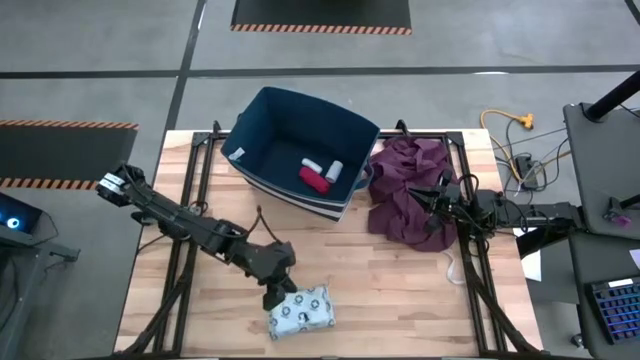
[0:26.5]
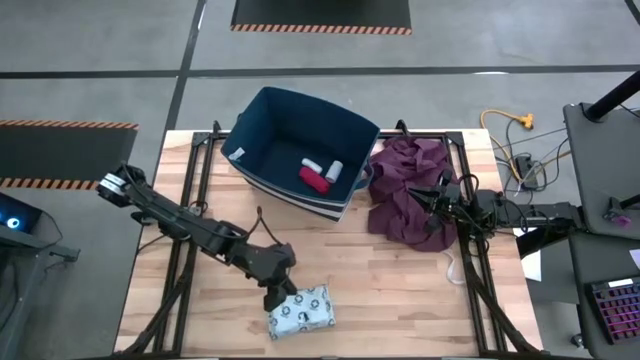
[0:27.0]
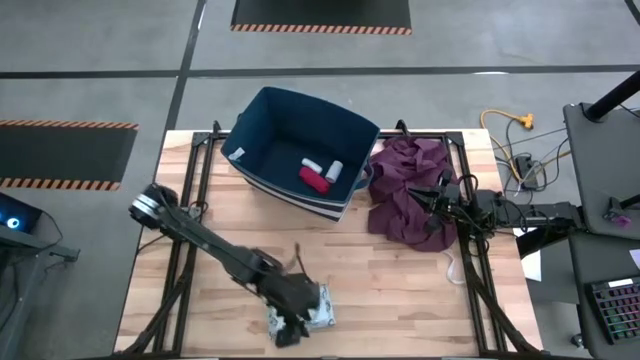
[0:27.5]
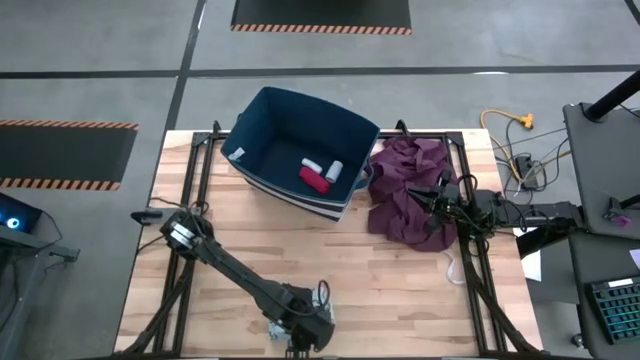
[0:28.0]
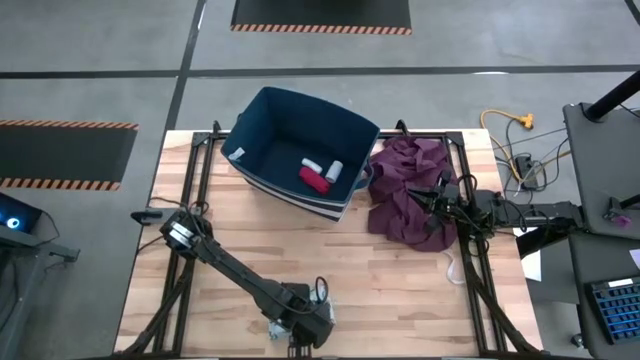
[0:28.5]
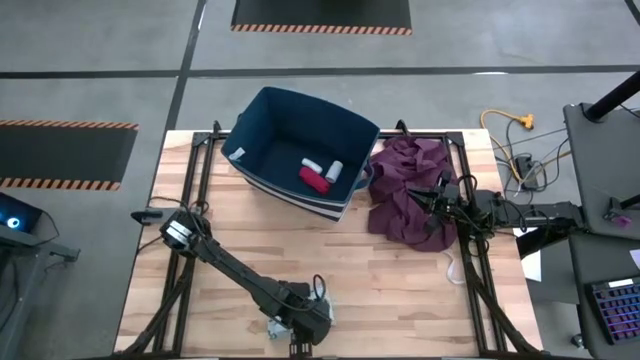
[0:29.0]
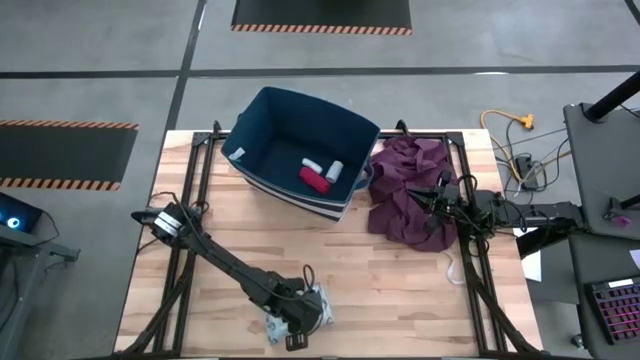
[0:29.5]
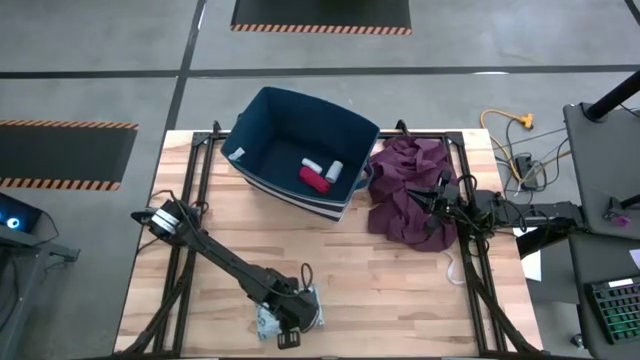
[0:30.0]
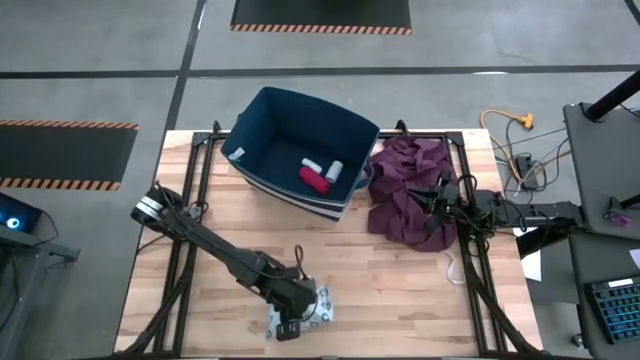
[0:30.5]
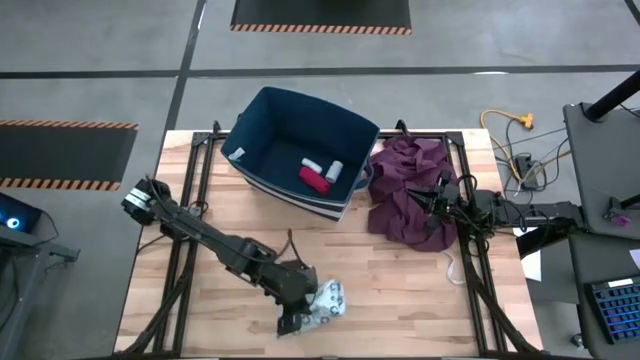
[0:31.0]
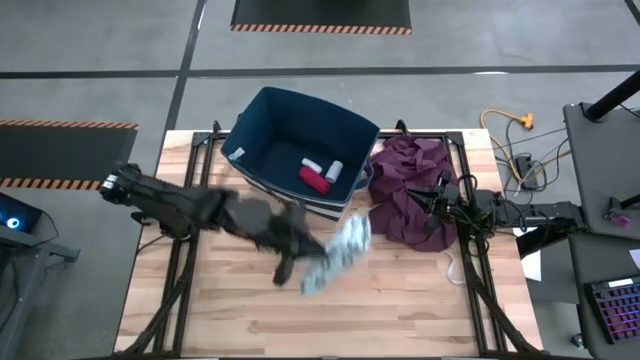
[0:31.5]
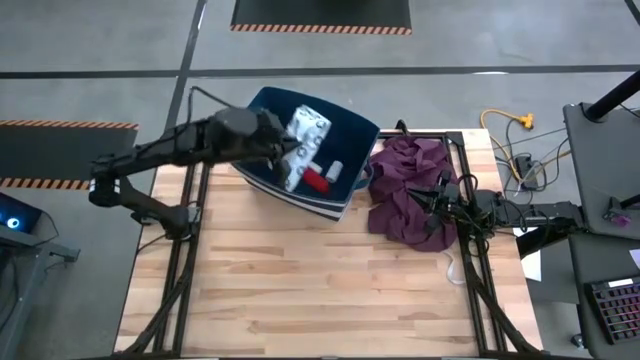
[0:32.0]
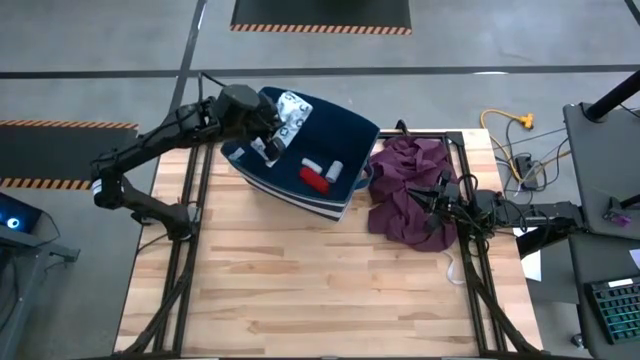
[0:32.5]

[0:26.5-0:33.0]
Task: Pick & place medical supplies in basket/bin
Put the white mailer bag into the blue bin

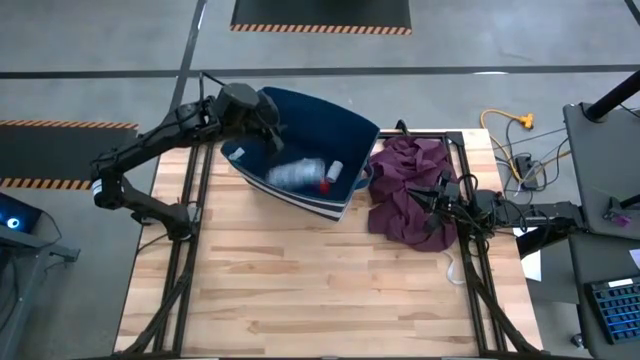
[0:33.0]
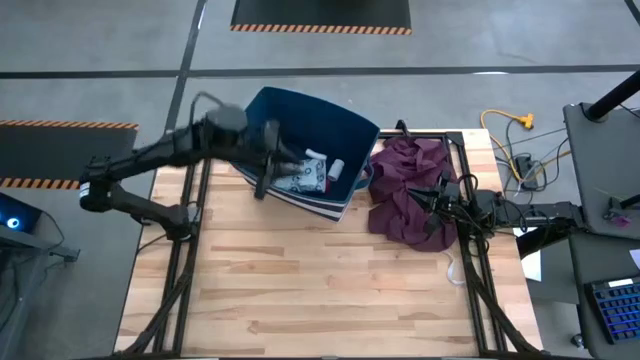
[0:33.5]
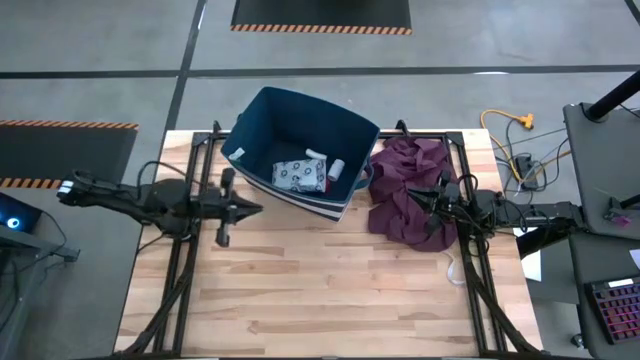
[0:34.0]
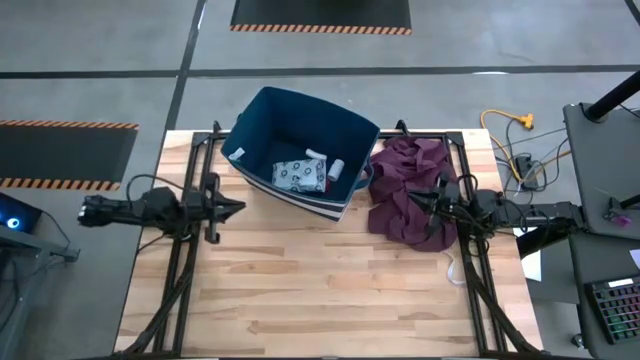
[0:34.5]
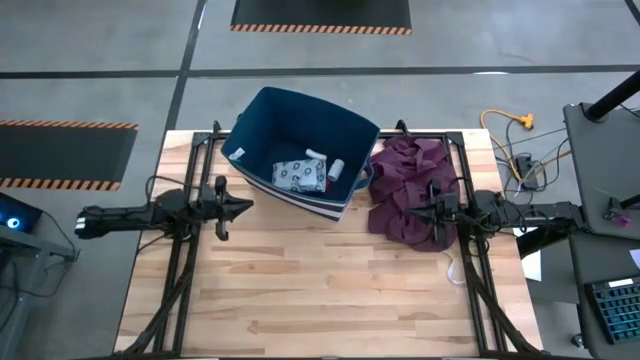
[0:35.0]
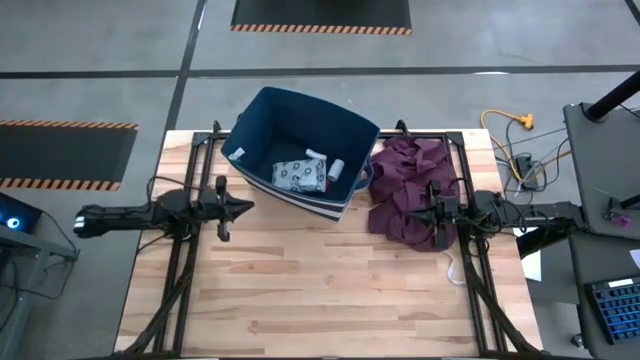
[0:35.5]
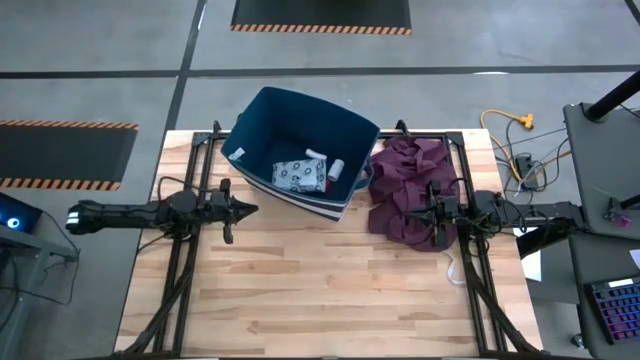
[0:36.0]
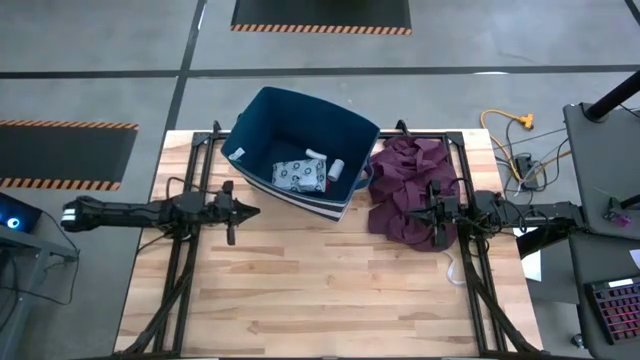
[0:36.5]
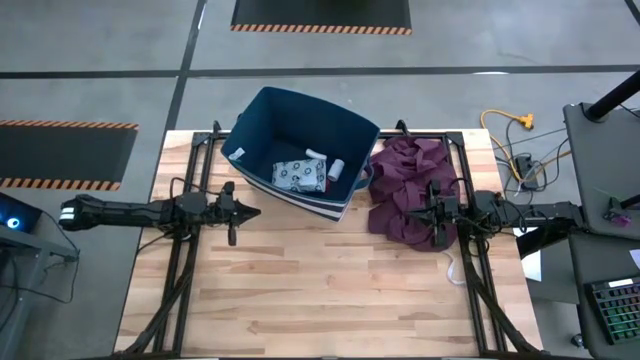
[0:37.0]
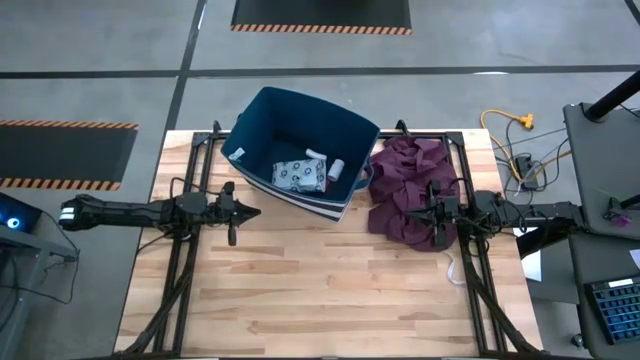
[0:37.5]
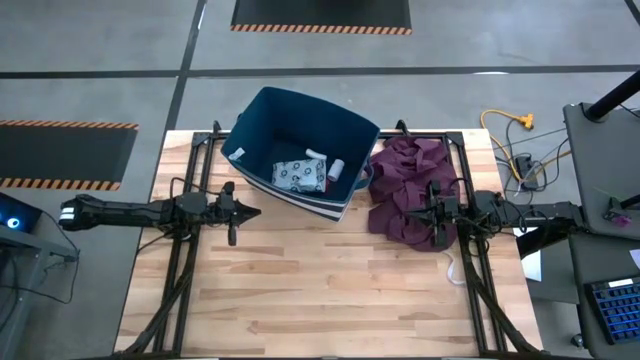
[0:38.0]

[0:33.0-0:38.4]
Return to Home Position

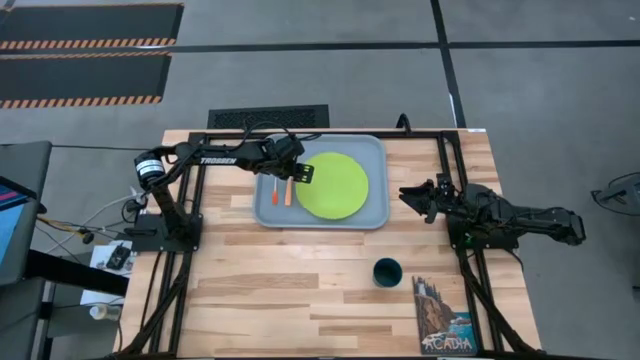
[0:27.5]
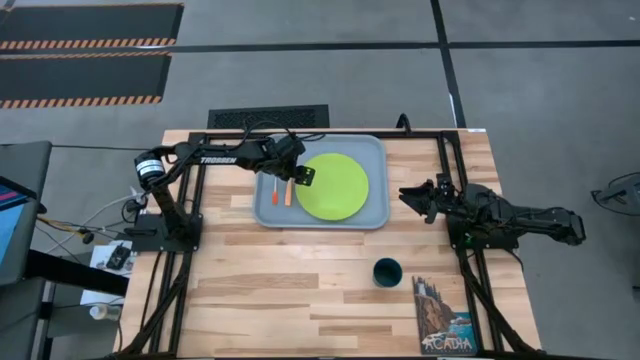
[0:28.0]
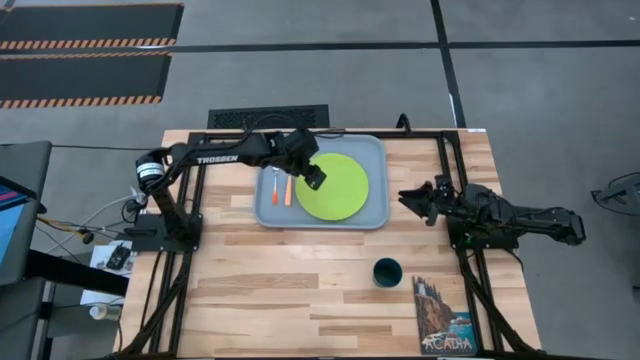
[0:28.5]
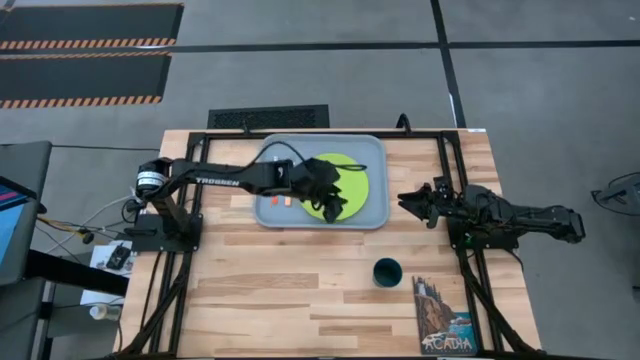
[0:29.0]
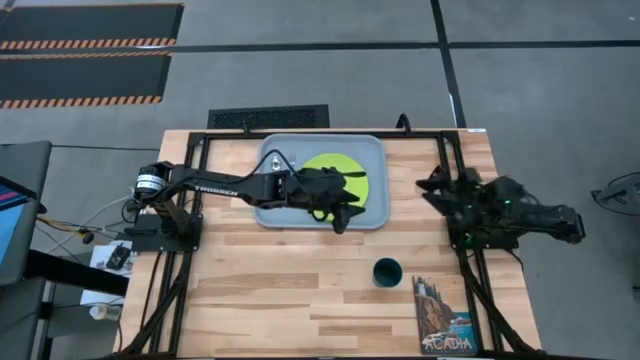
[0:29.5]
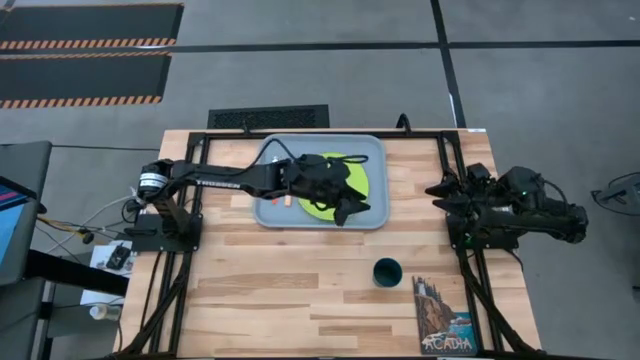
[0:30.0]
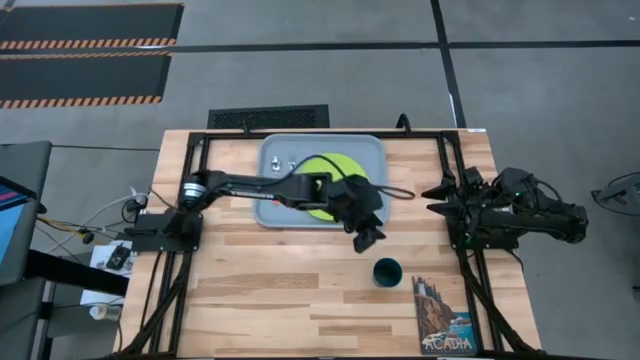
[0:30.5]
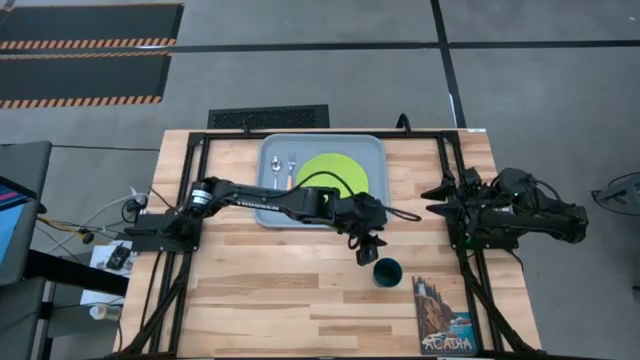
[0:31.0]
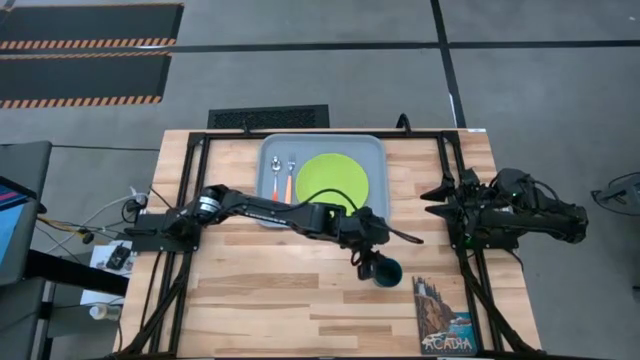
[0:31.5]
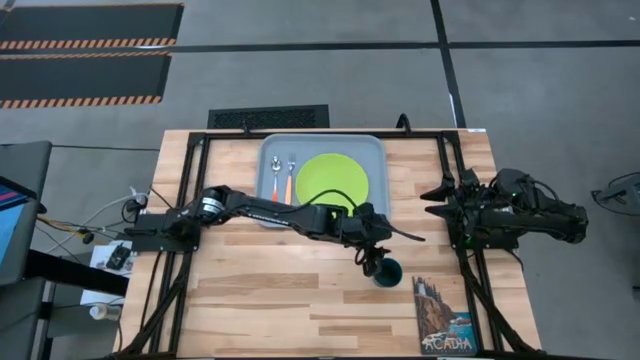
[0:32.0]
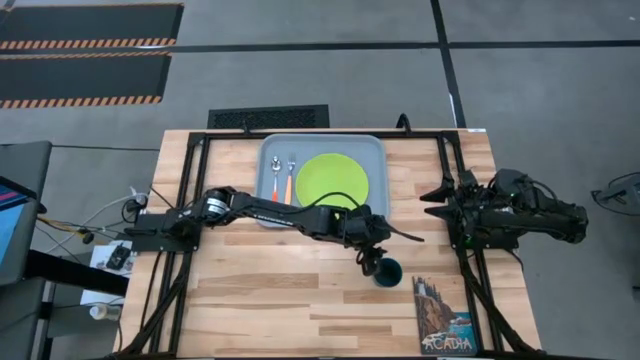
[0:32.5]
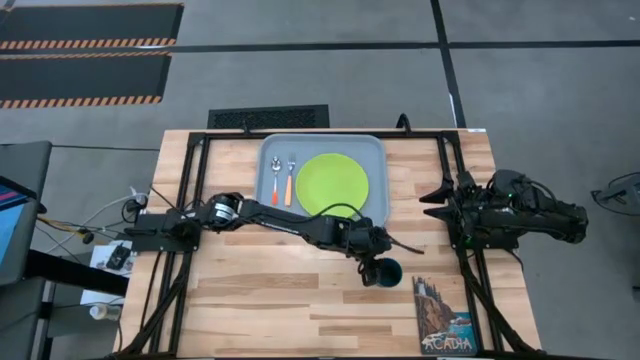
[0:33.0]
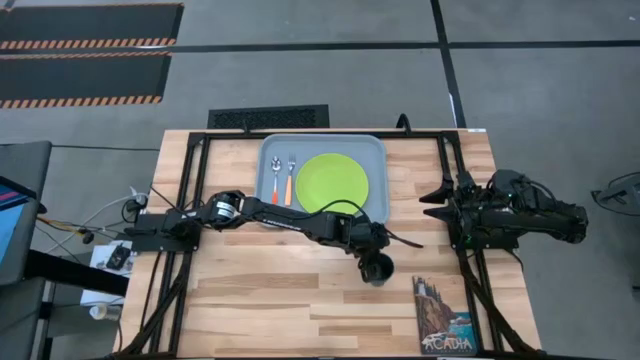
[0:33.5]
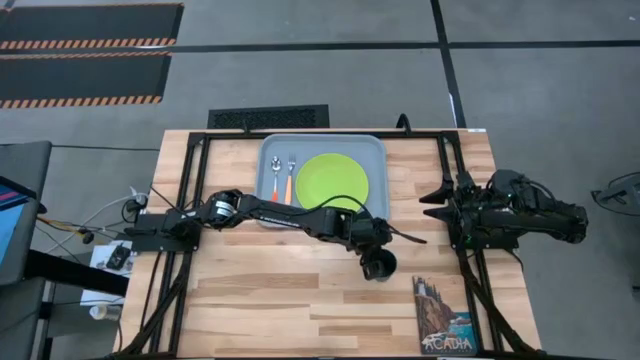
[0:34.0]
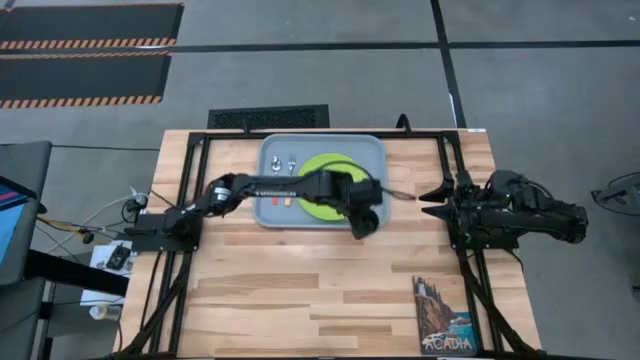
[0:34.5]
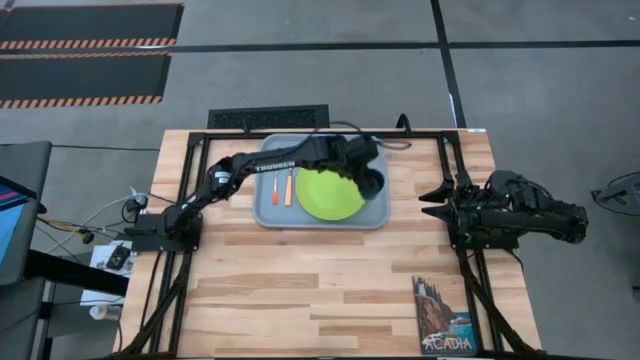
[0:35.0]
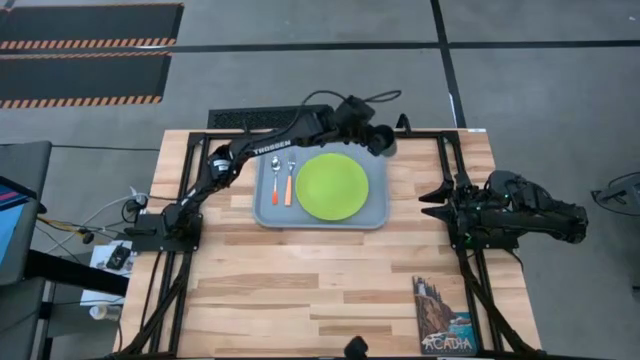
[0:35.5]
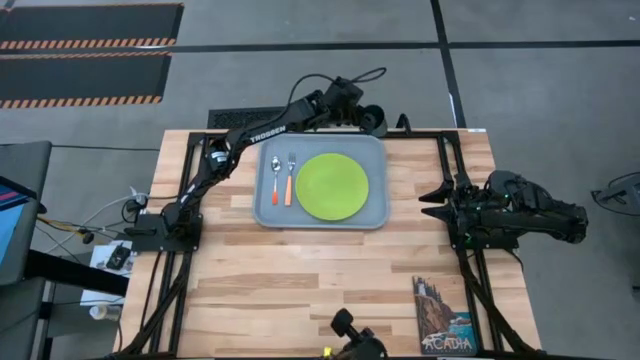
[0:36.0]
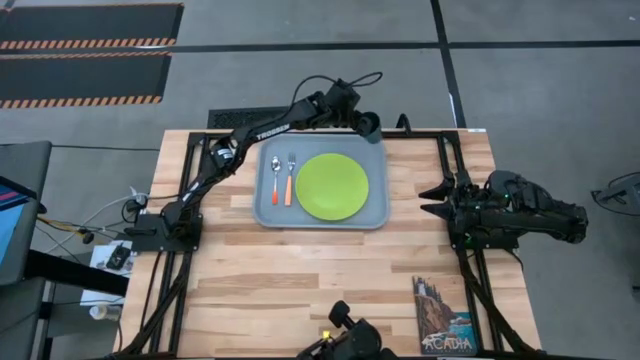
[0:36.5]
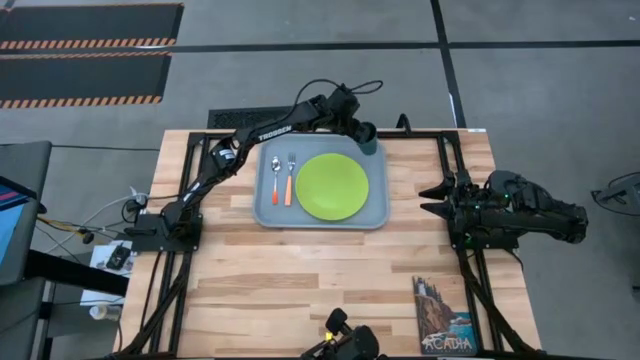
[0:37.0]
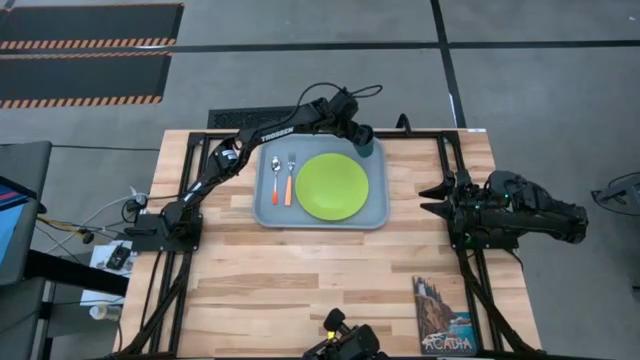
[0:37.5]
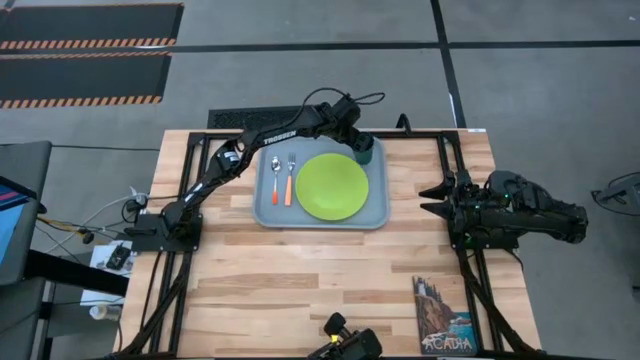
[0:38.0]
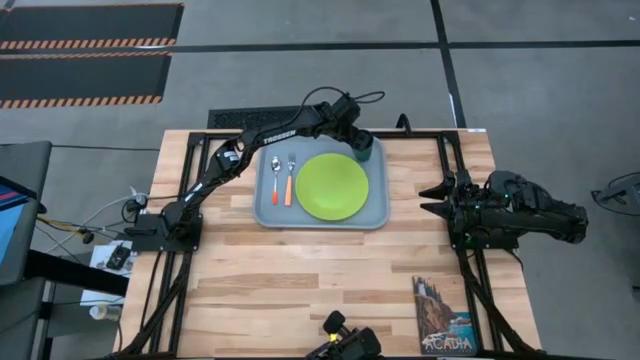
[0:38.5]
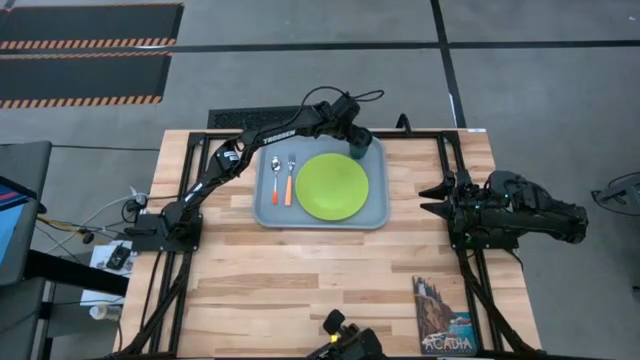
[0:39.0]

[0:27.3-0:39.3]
Task: Pick and place plate/cup/fork/spoon on tray
Put the green cup on the gray tray to the top of the green plate
